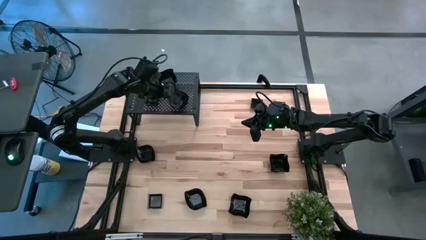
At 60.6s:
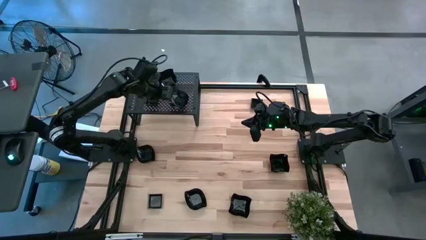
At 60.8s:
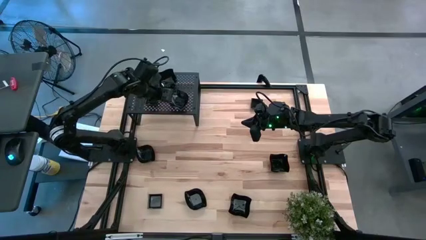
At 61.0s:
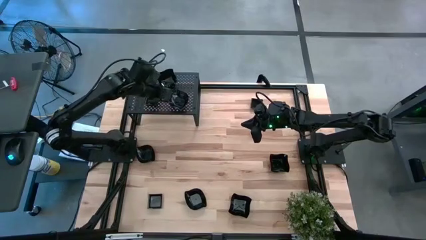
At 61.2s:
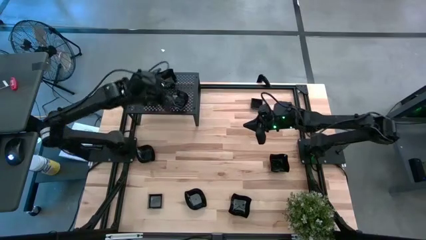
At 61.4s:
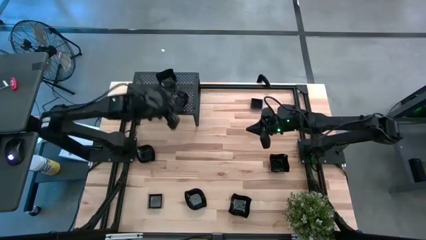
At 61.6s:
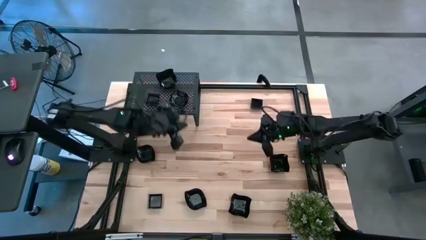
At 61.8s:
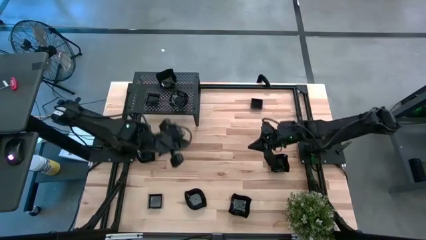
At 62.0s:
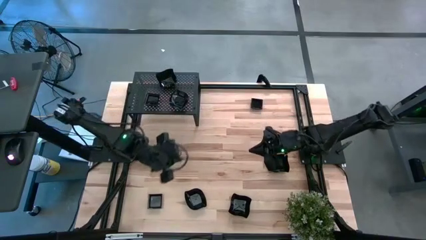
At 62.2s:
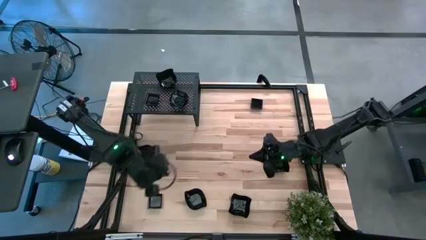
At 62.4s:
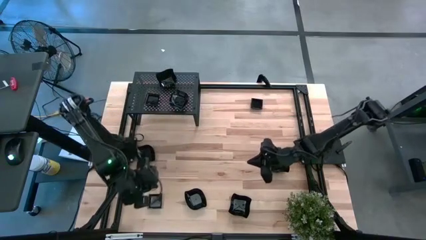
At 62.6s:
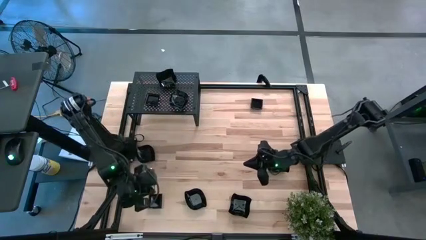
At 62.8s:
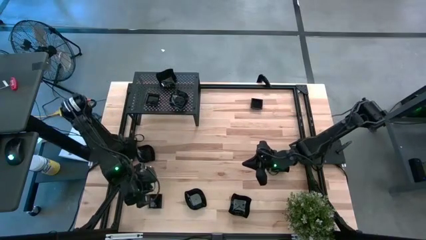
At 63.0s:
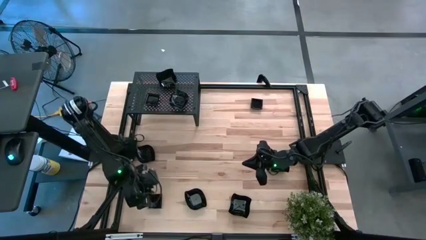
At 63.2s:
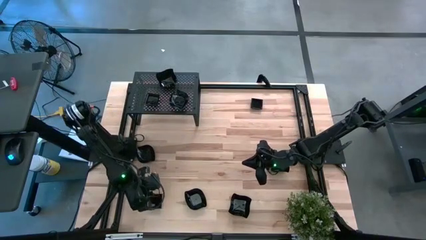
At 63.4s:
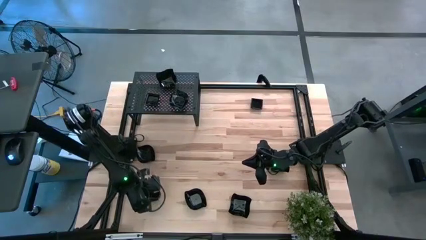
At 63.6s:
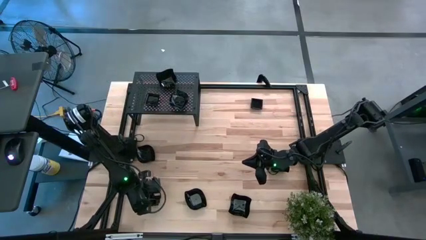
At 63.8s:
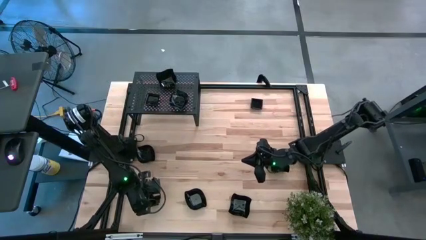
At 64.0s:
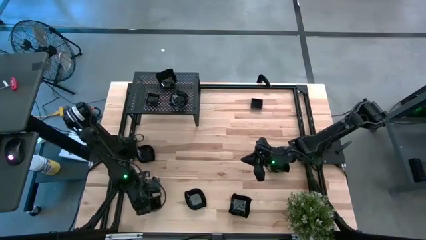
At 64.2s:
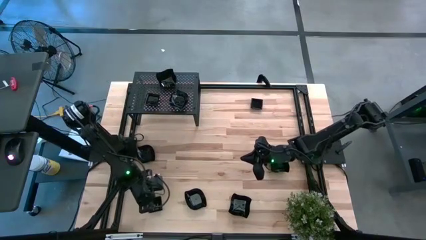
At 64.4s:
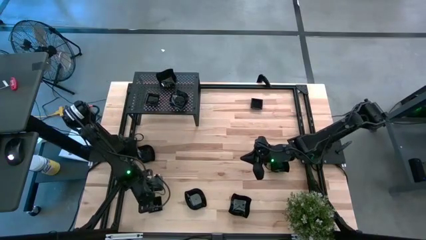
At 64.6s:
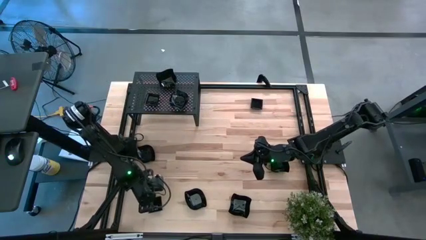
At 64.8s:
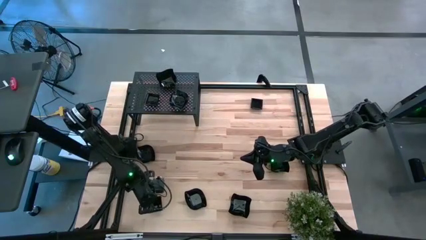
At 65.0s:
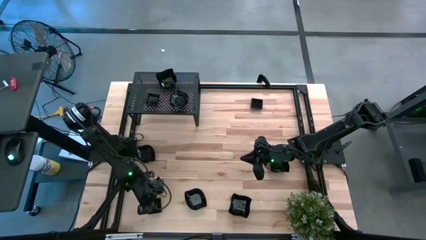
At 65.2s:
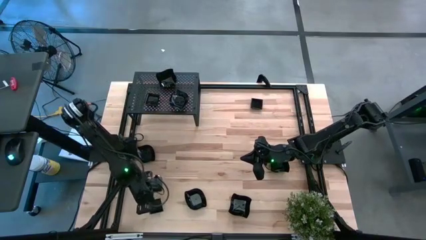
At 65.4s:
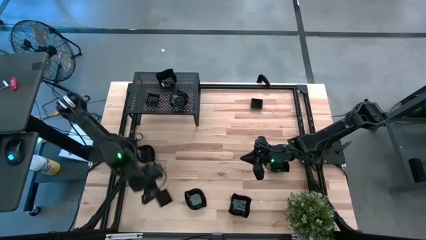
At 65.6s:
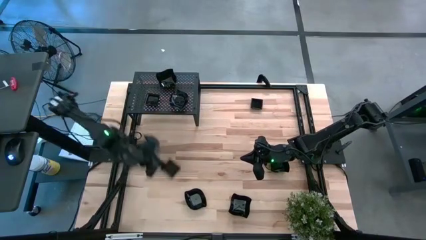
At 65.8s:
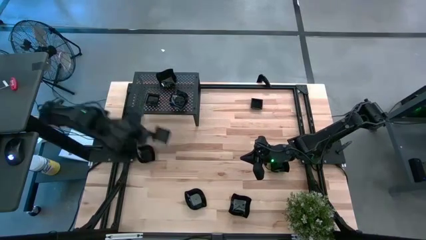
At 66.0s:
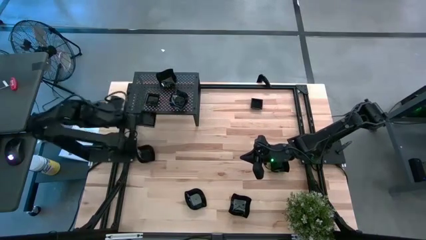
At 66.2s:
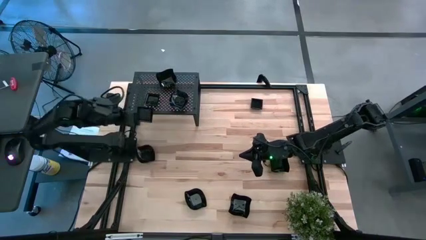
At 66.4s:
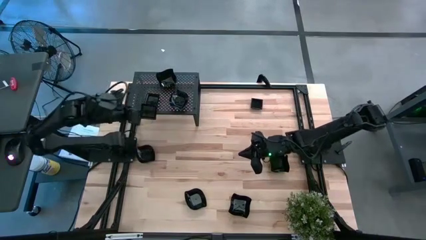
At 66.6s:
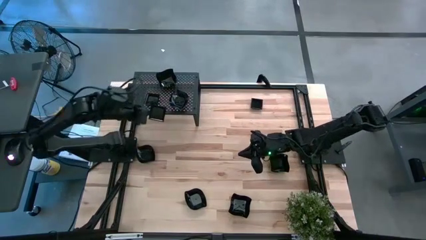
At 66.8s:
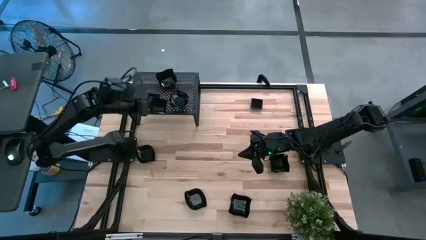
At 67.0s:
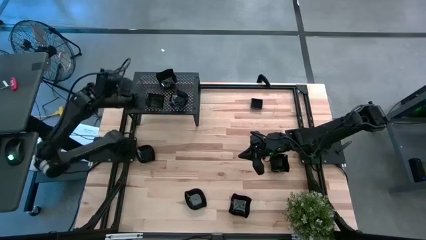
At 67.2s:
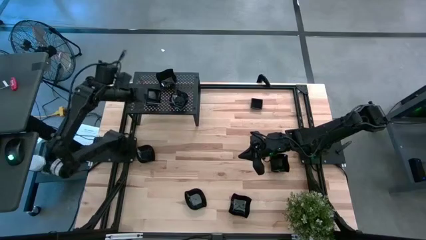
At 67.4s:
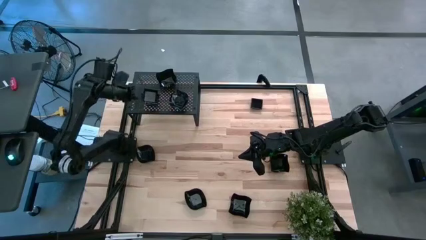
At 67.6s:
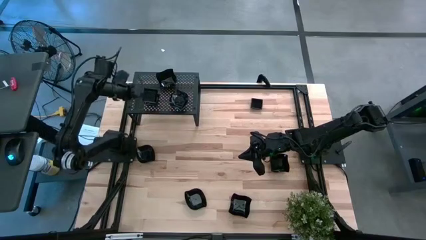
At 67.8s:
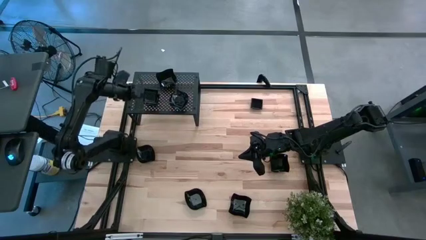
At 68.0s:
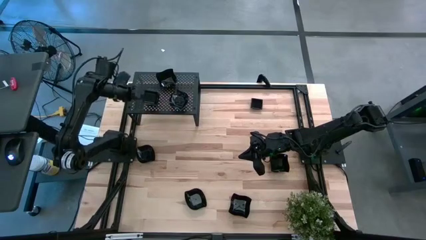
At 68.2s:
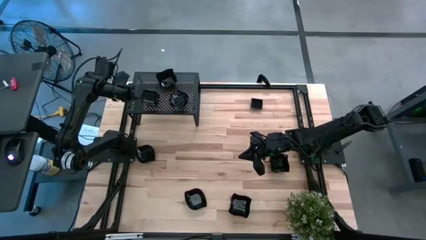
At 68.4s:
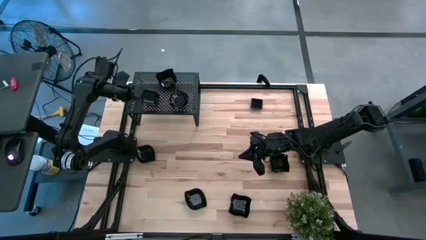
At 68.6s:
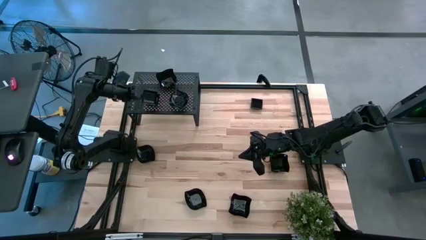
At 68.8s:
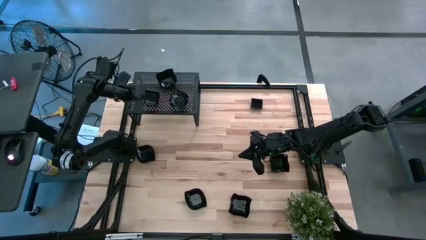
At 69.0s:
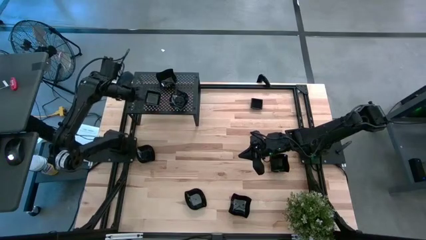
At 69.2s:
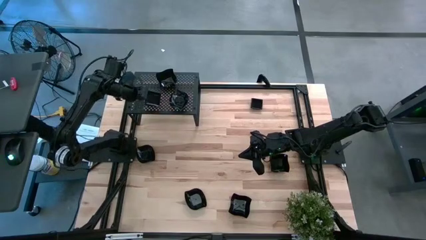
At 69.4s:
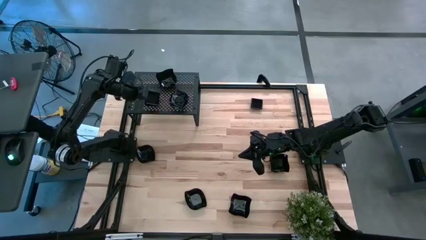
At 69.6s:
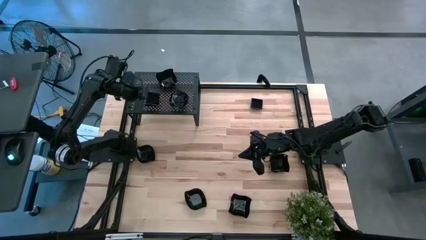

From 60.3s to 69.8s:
Task: Pick & Place Mini shaped plates
Stack the black square plate on the other black square plate on the shelf

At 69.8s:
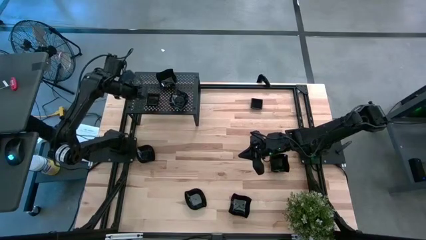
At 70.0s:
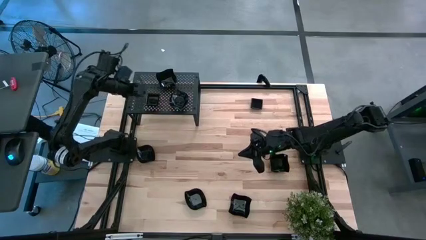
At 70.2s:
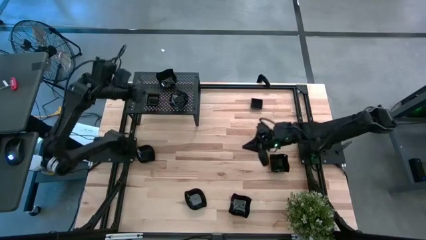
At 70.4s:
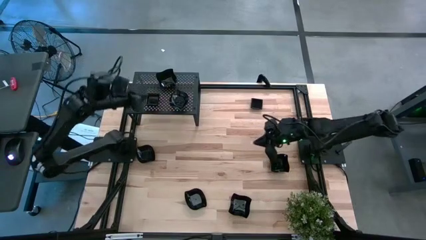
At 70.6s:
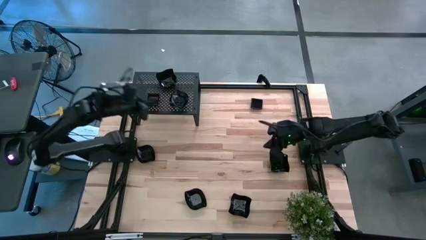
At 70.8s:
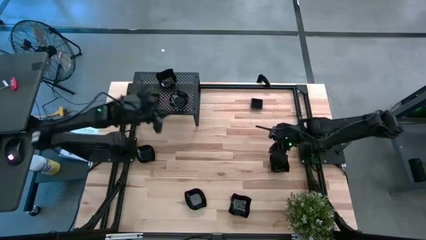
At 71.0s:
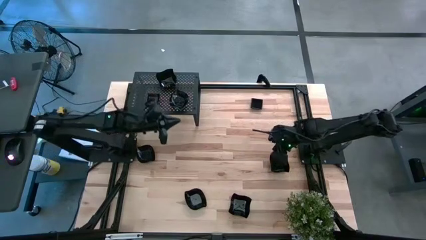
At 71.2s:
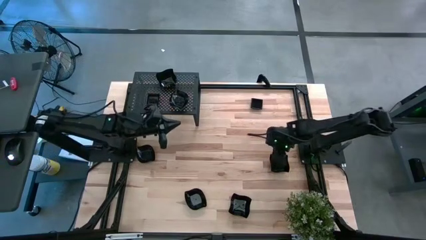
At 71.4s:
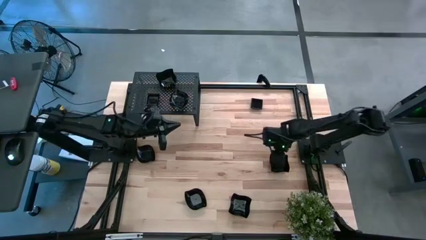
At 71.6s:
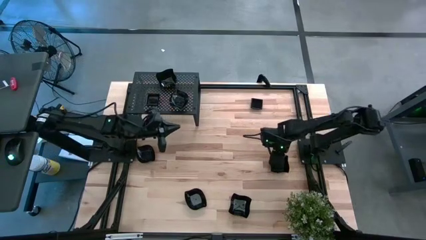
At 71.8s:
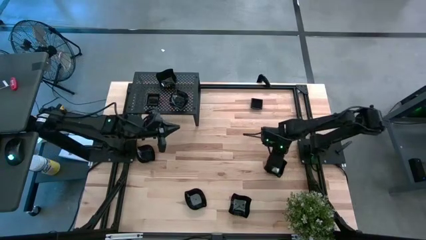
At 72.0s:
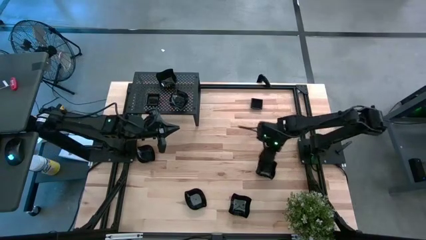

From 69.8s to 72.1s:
Stack the black distorted square plate on the other black distorted square plate on the shelf

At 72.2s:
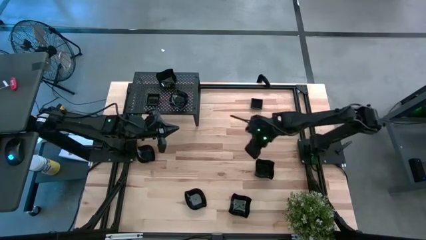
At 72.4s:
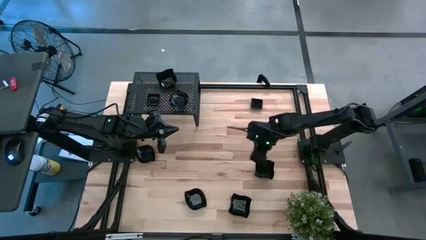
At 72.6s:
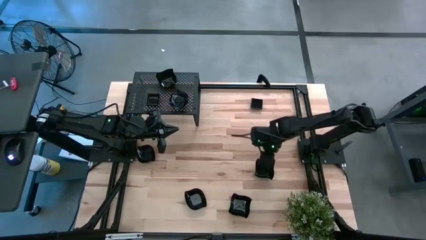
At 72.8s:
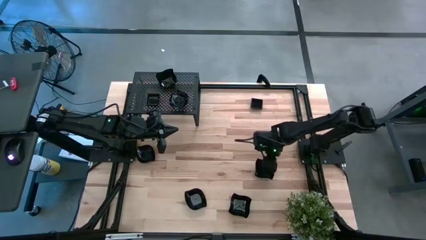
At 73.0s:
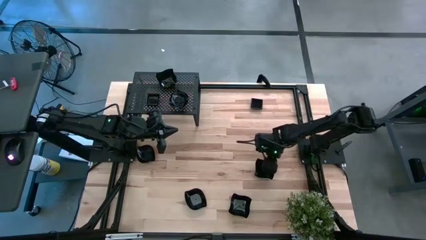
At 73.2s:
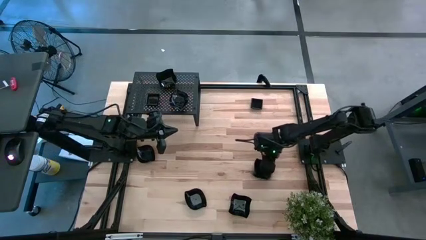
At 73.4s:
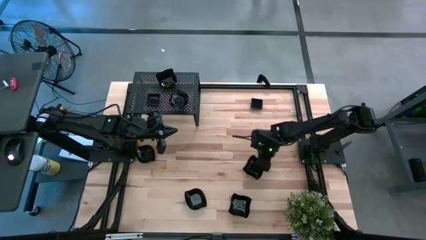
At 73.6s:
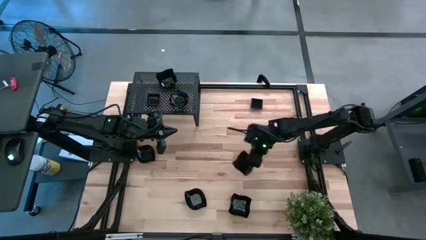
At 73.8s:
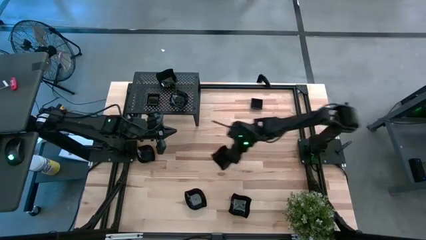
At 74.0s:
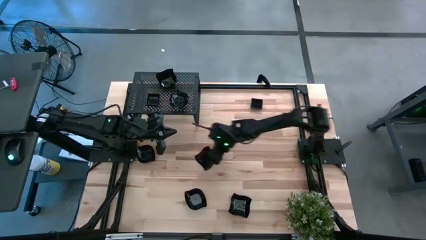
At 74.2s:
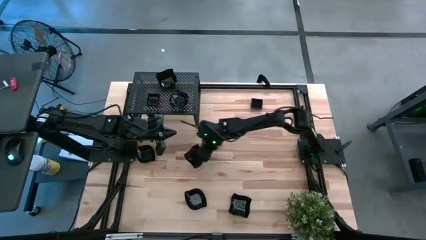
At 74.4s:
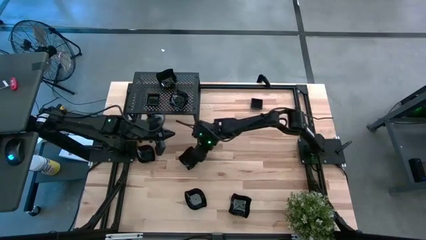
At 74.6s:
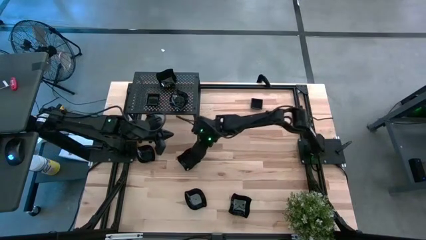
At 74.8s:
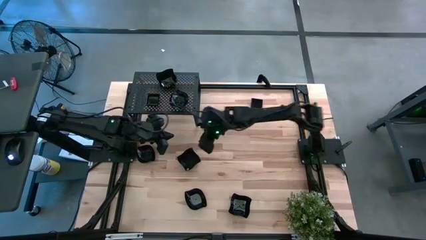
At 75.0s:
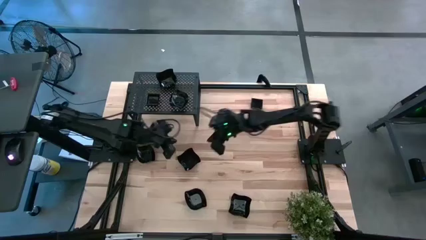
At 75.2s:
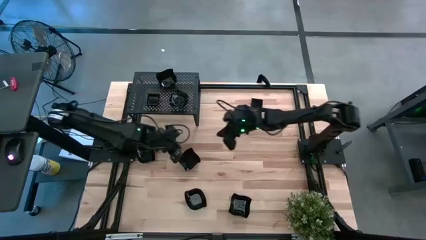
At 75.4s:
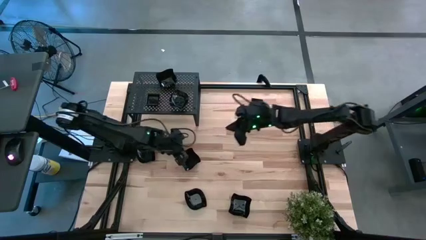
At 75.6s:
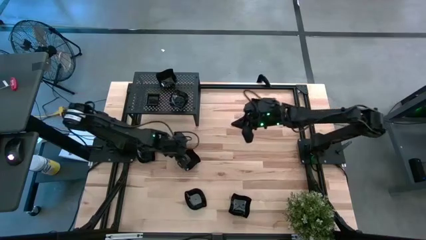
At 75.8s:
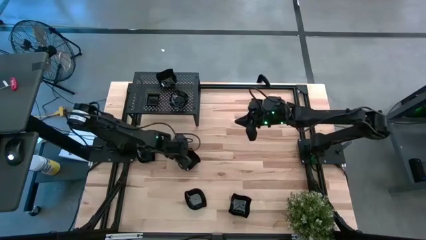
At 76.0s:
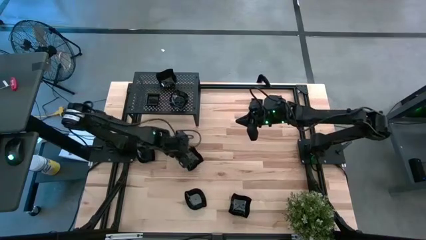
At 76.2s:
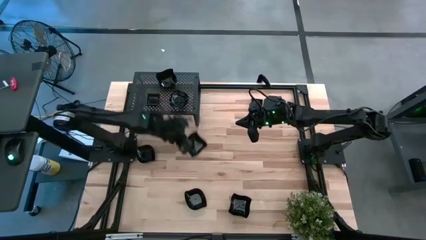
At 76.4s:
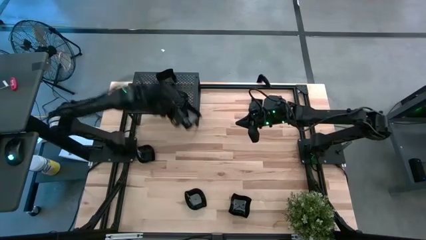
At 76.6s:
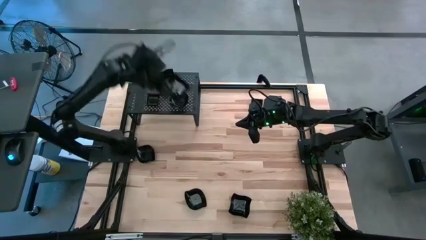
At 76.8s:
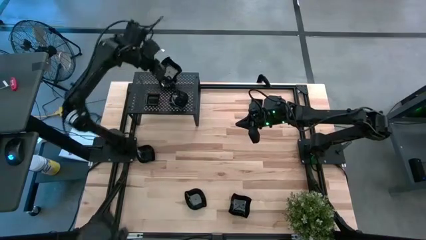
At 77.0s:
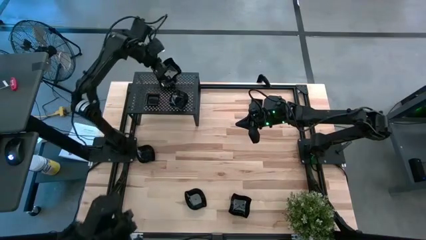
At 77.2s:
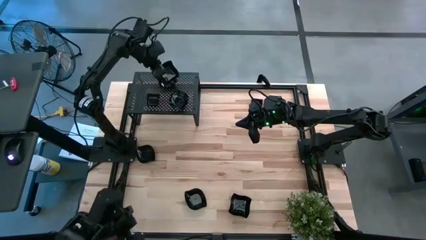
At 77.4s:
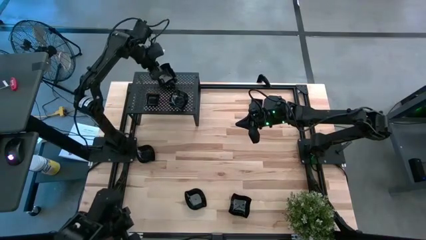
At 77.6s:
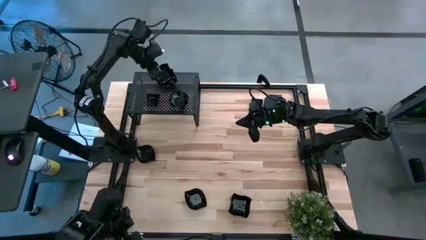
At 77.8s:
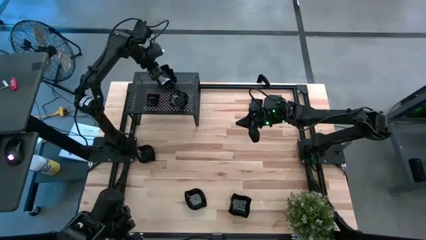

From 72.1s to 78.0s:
Stack the black distorted square plate on the other black distorted square plate on the shelf
